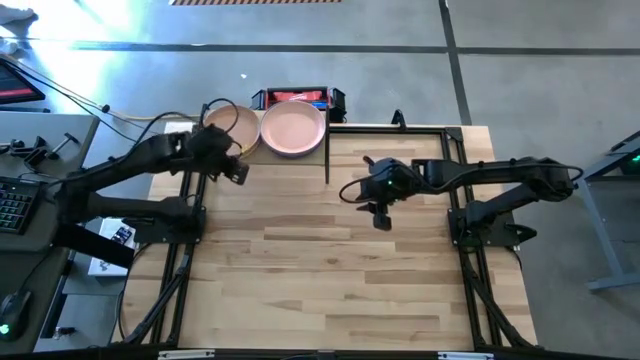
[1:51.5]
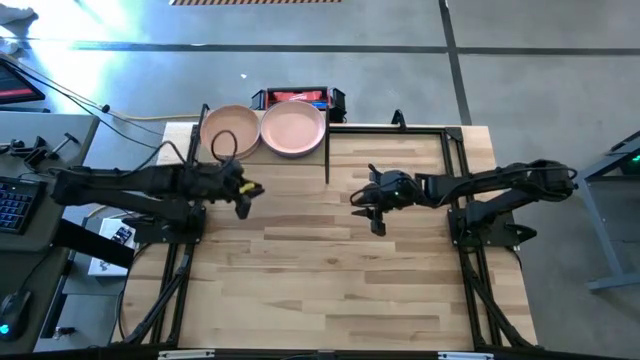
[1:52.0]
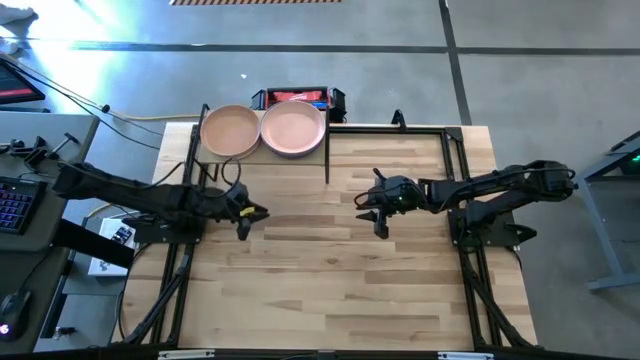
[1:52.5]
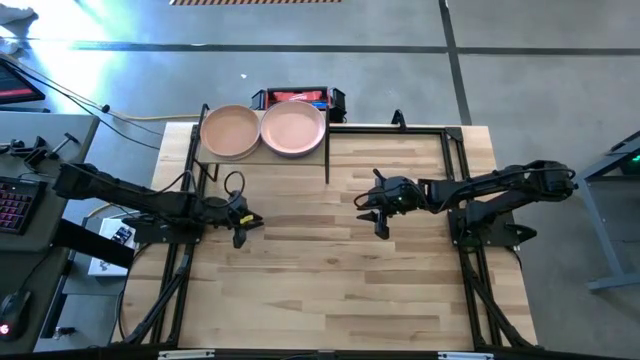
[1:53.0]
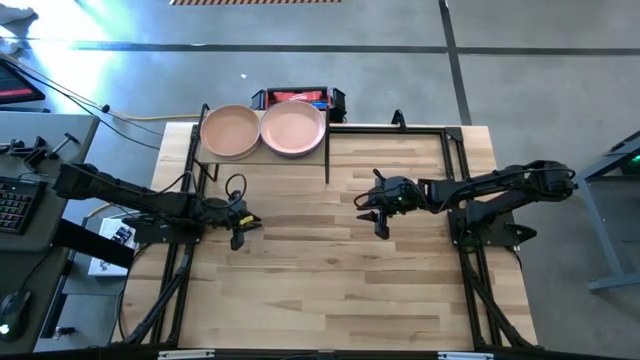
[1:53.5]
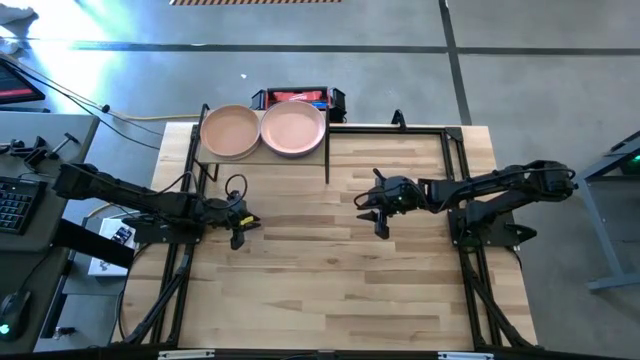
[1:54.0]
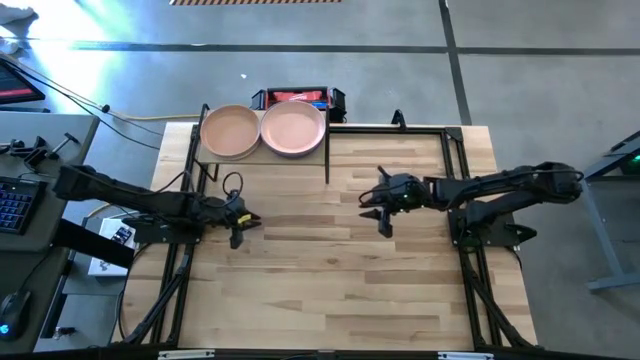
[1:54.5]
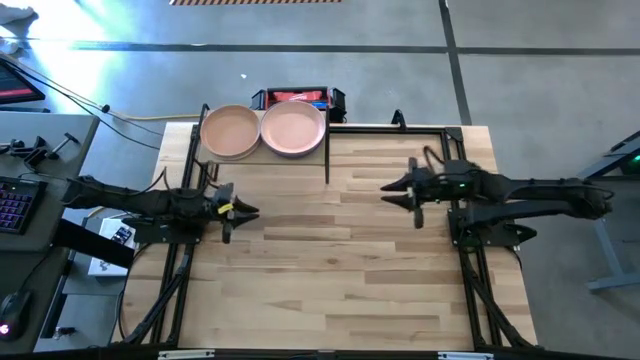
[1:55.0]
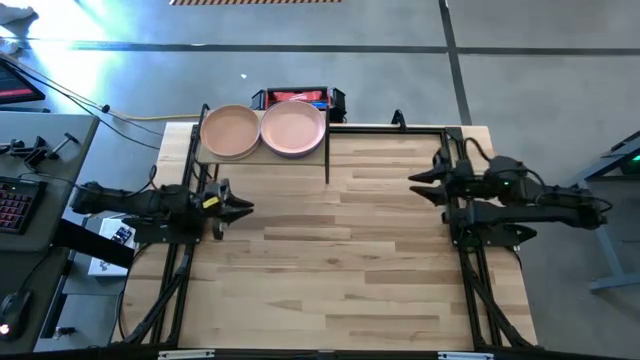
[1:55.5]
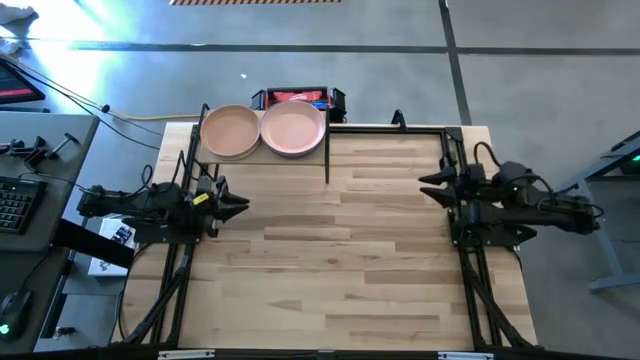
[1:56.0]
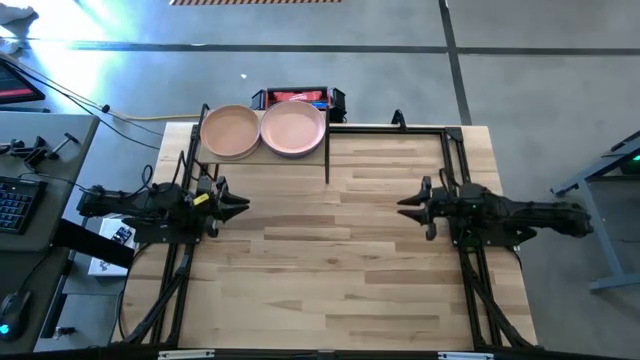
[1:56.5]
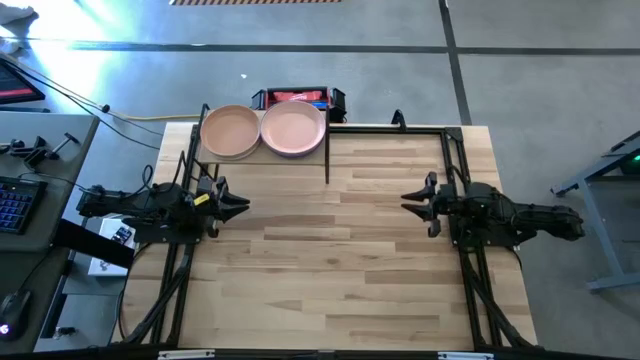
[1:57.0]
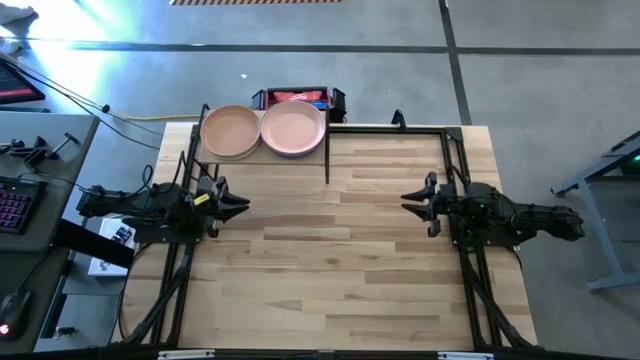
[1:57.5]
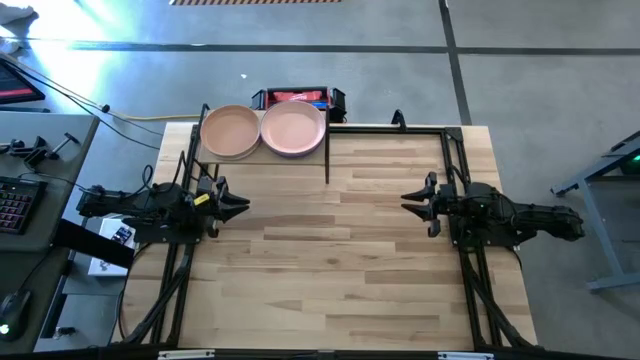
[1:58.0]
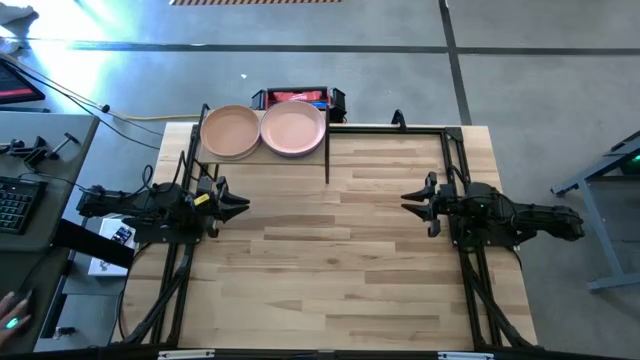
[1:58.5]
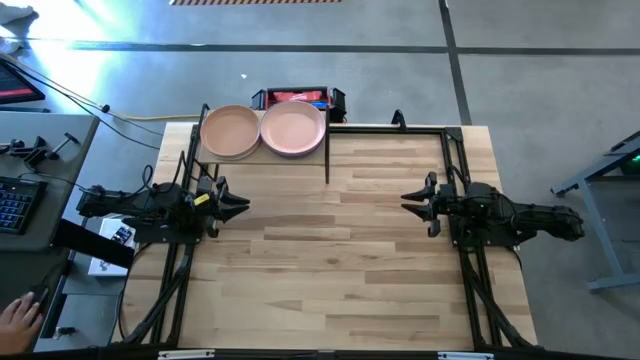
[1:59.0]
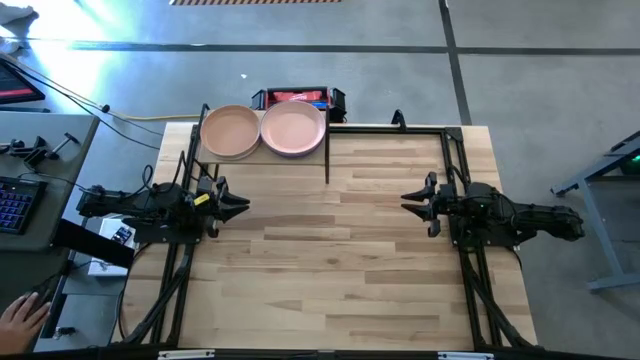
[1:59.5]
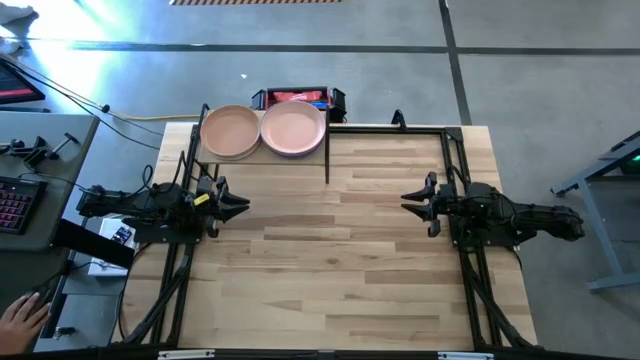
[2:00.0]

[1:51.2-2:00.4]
Task: Place and stack plates onto a shelf
Return to Home Position

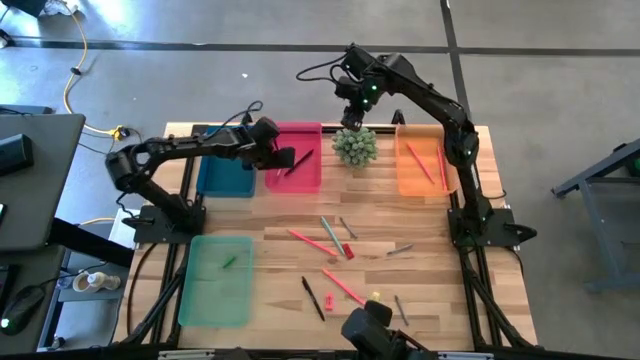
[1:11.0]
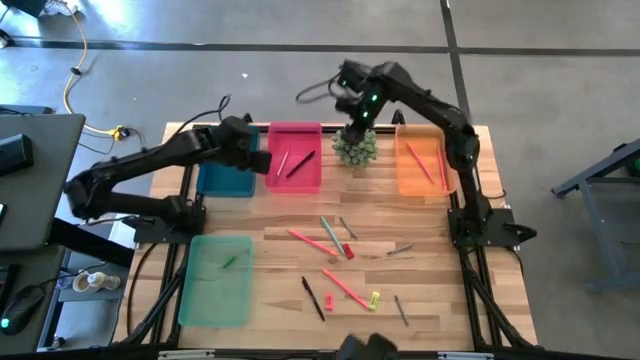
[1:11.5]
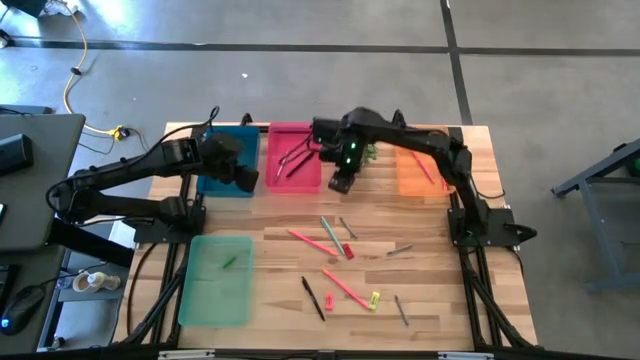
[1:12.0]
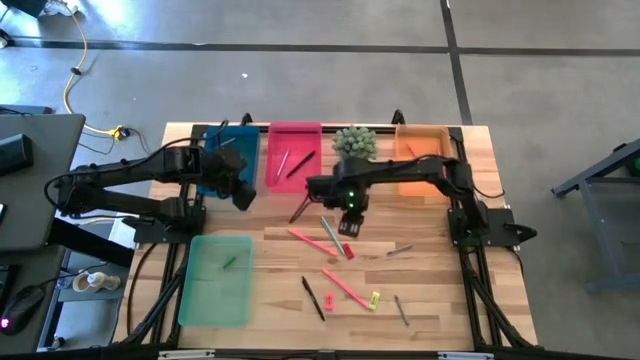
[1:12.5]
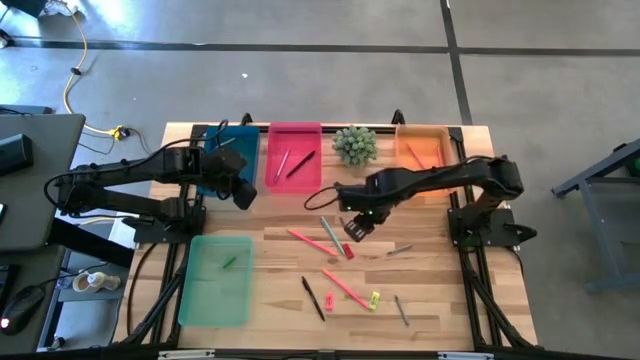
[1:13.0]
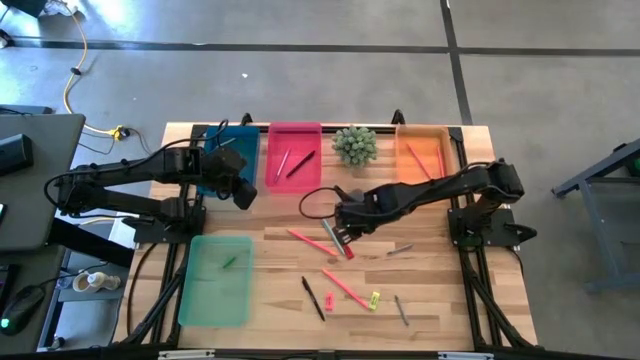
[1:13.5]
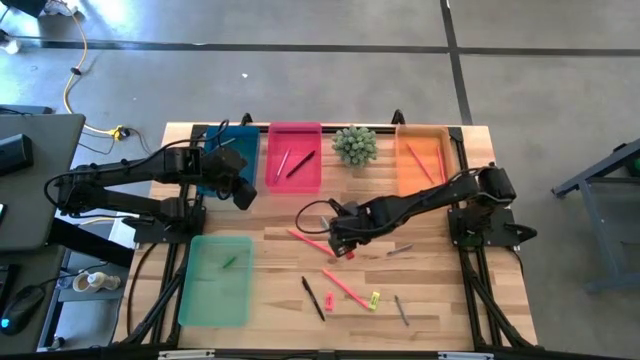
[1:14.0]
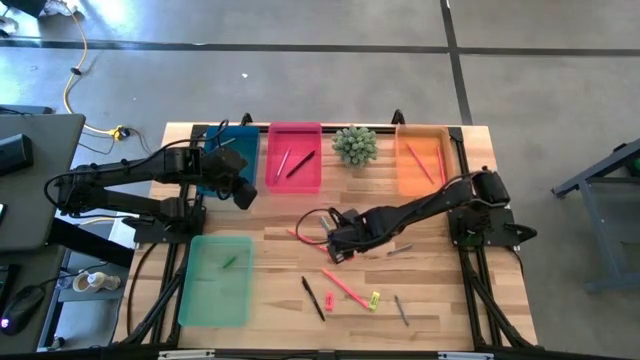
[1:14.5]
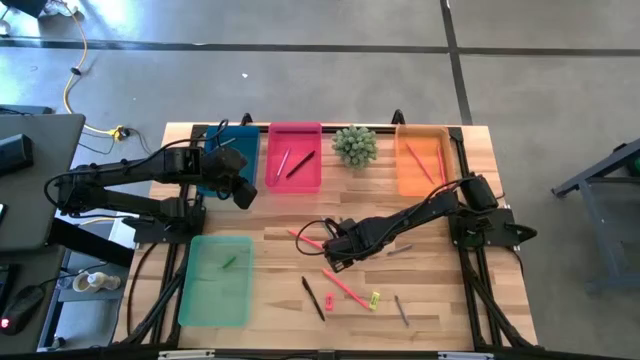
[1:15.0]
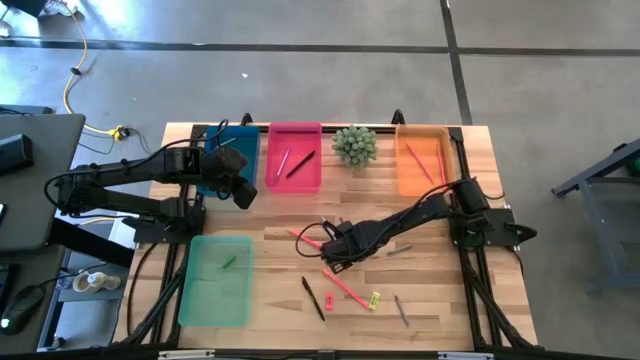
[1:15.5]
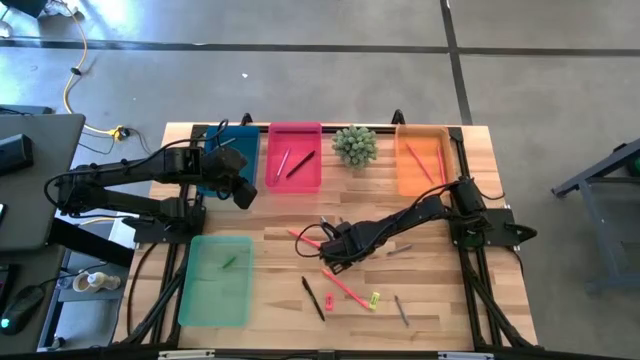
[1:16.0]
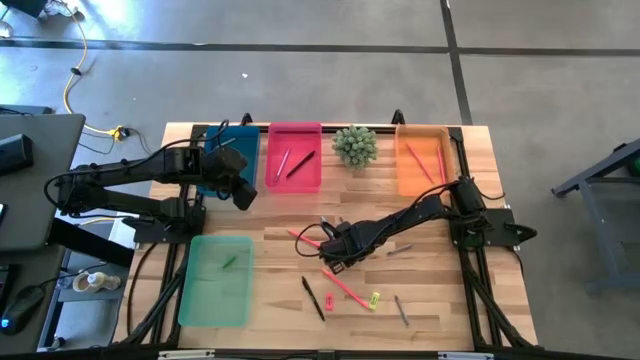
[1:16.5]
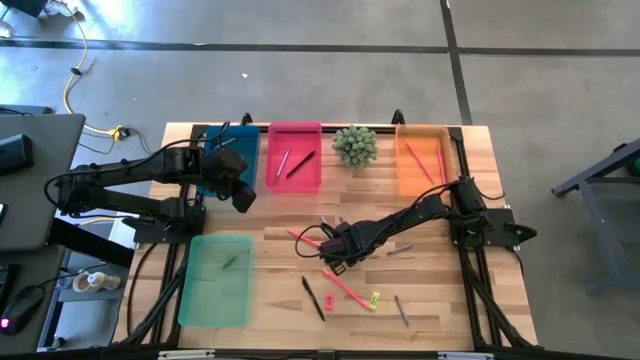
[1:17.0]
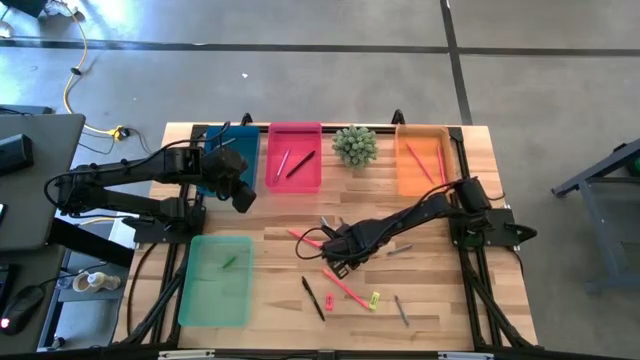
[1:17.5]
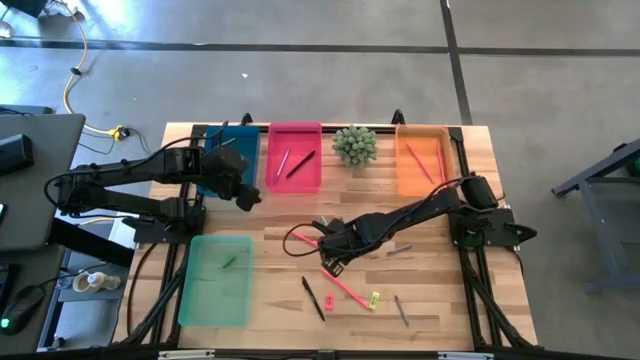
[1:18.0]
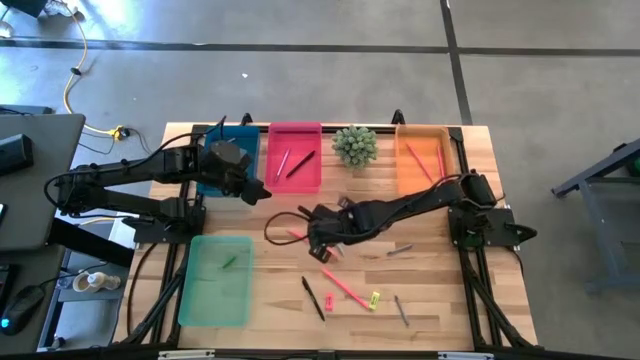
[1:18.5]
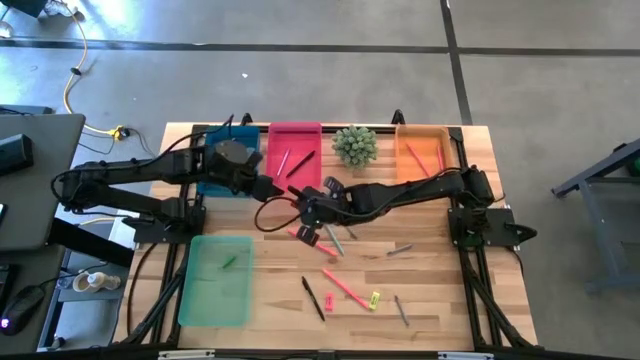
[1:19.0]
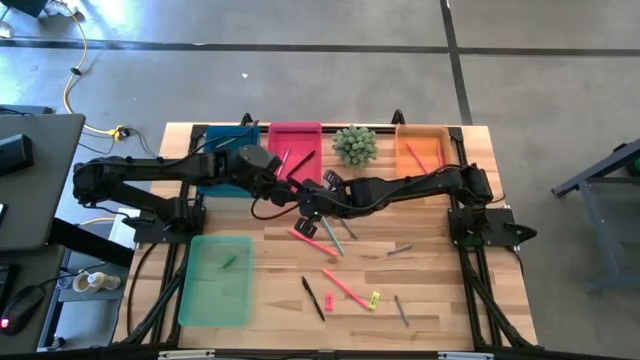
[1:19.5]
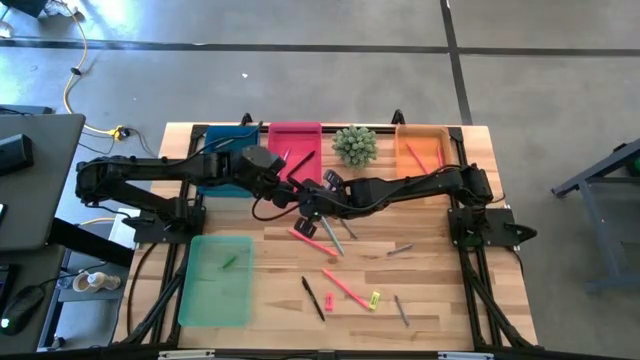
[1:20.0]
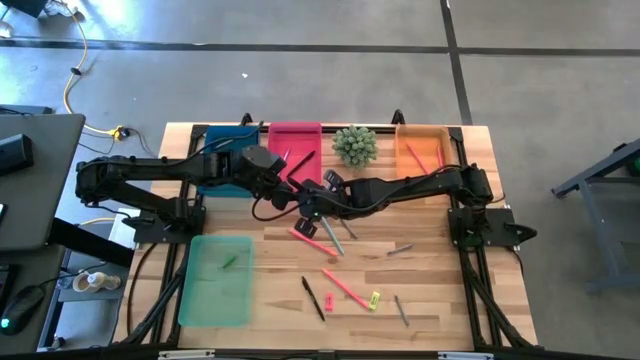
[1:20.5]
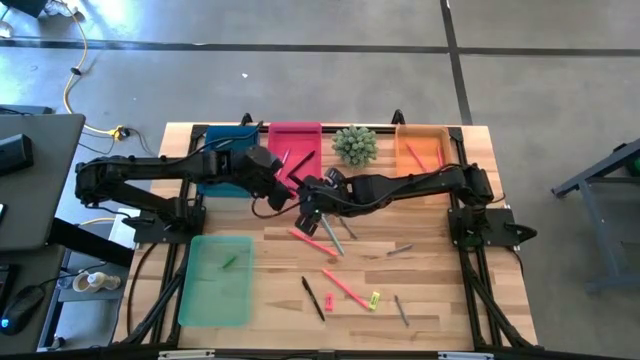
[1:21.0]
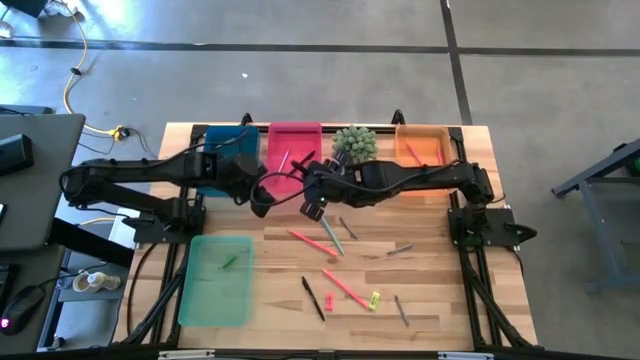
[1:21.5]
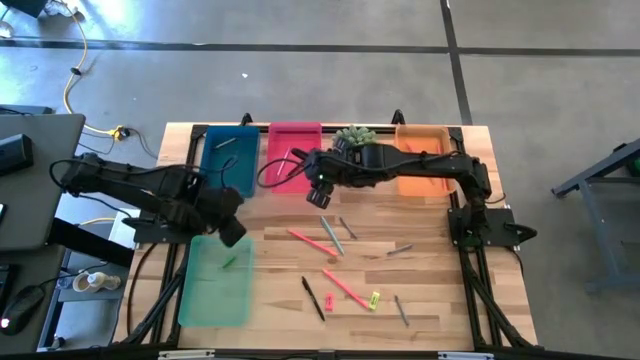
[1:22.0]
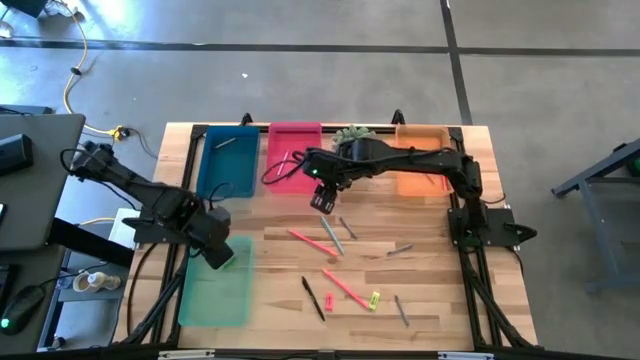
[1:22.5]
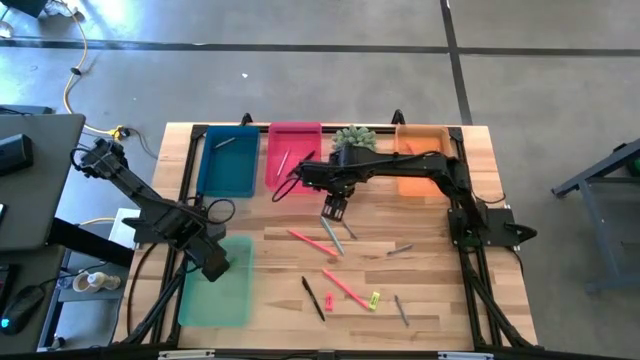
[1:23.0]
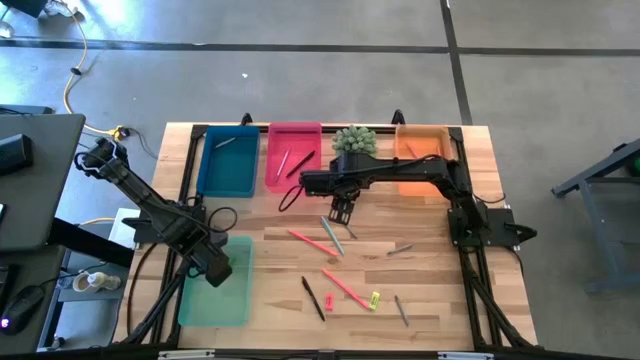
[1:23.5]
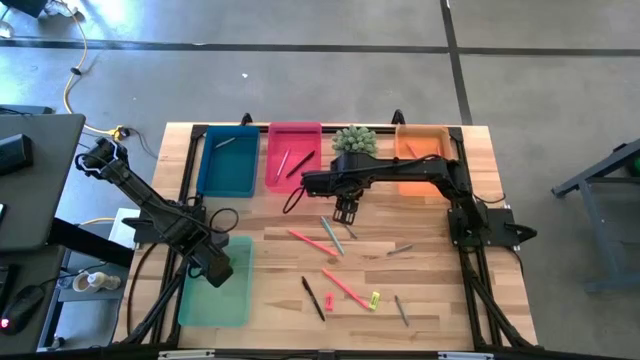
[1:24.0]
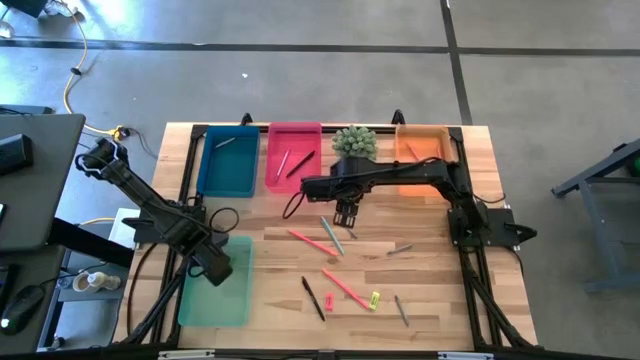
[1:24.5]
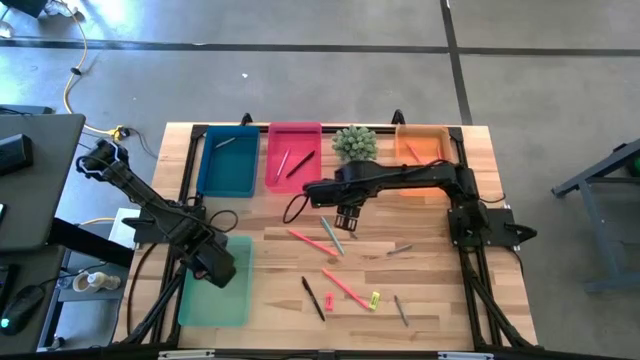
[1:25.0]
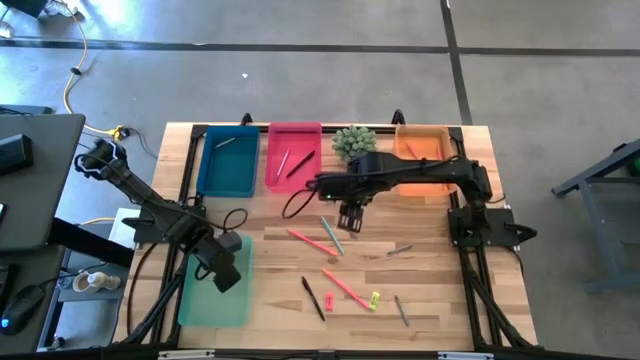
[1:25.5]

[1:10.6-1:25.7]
Task: Sort crayons/erasers/pens/pencils in bins
Put the red eraser into the green bin
